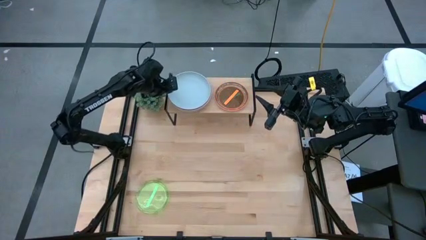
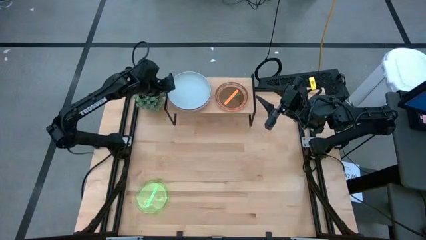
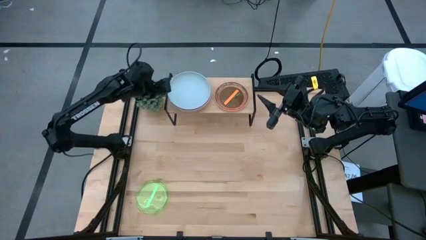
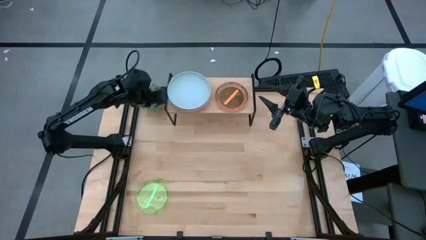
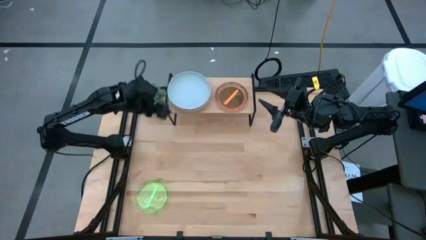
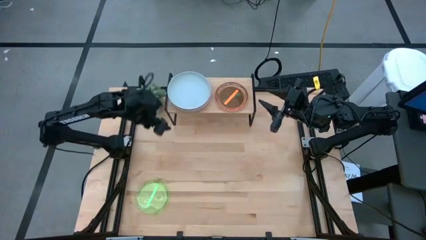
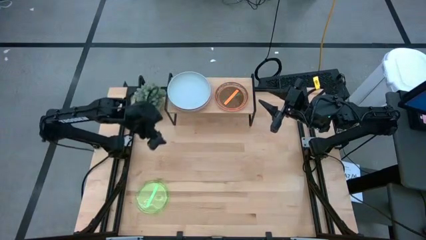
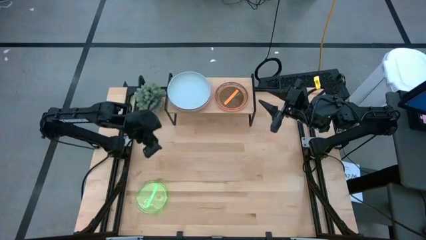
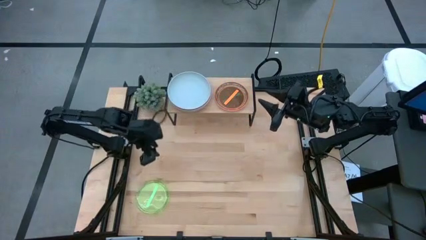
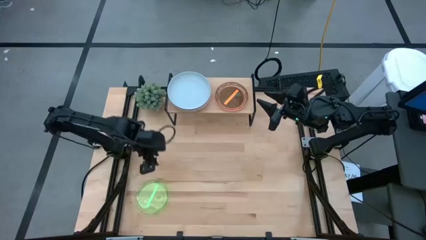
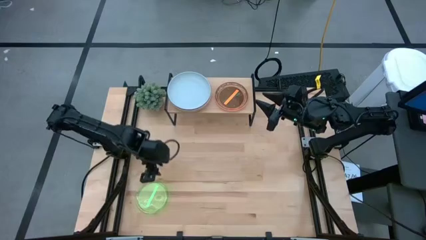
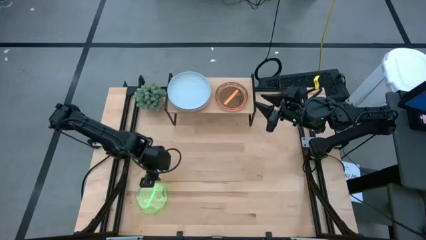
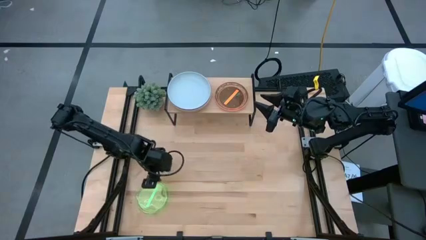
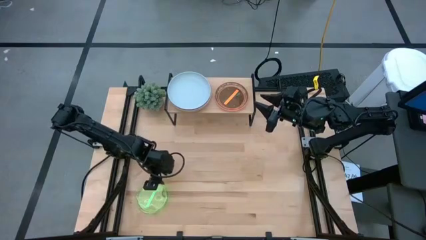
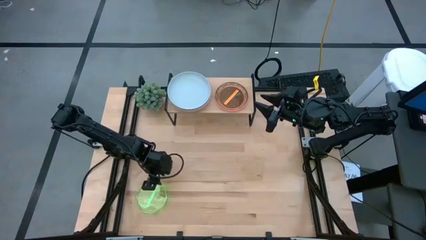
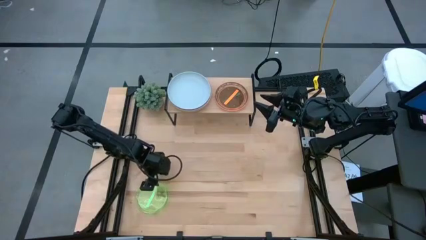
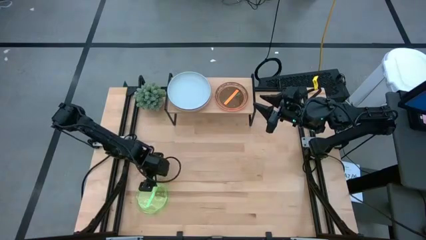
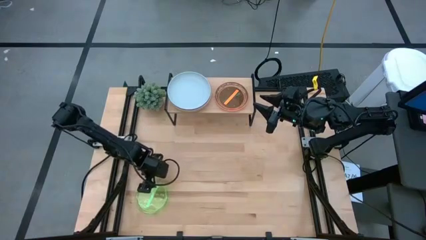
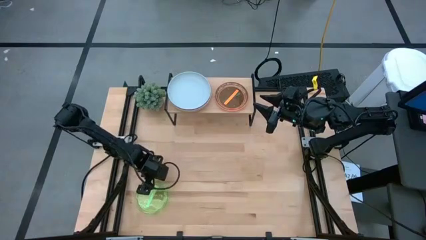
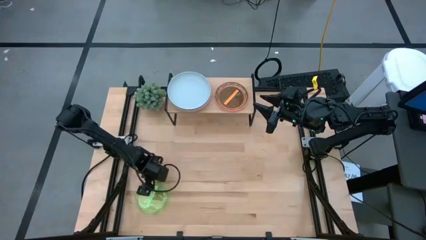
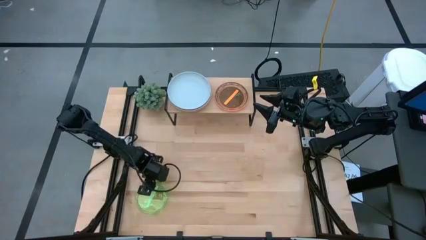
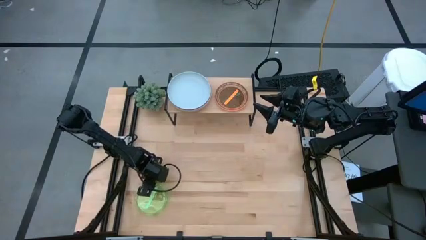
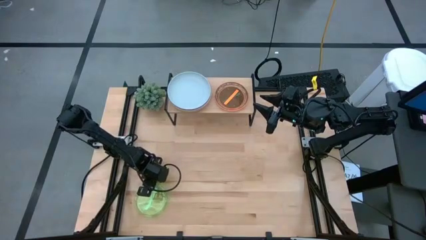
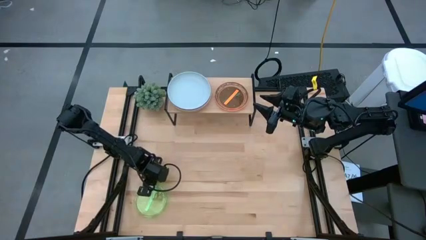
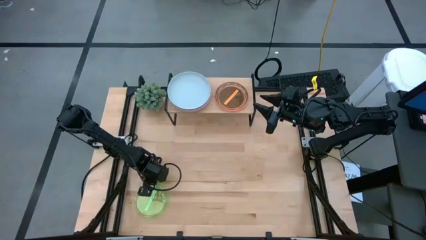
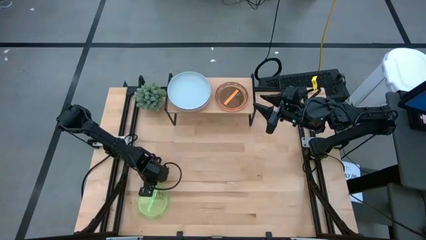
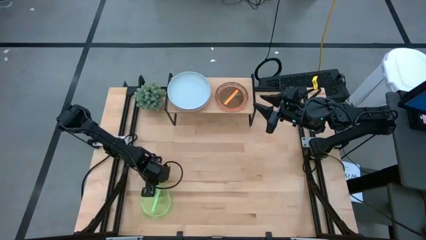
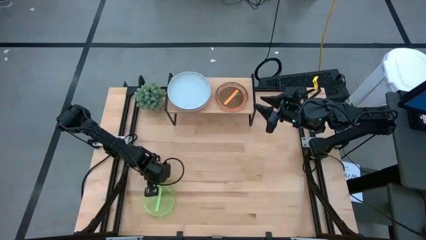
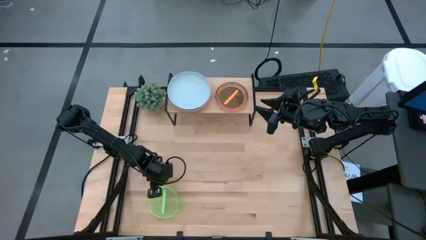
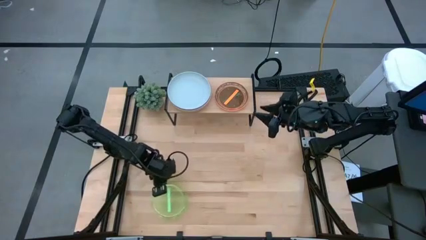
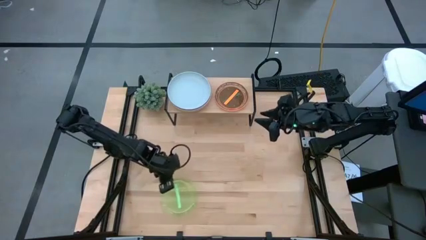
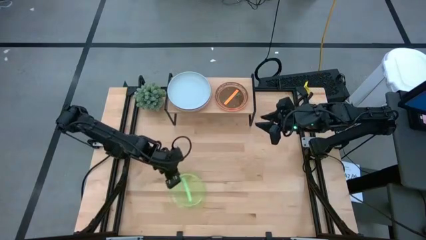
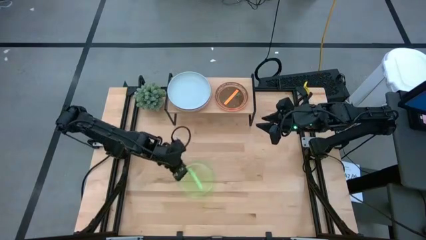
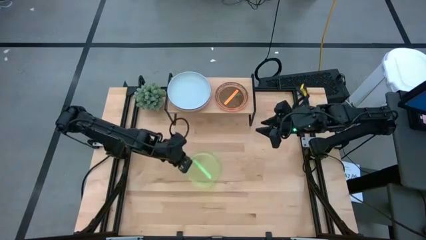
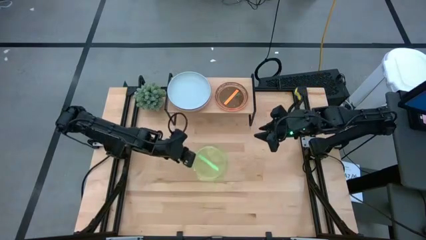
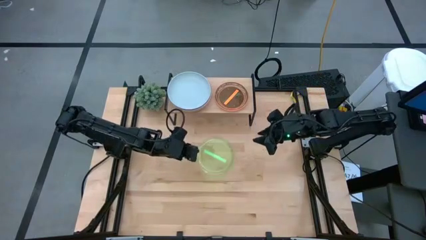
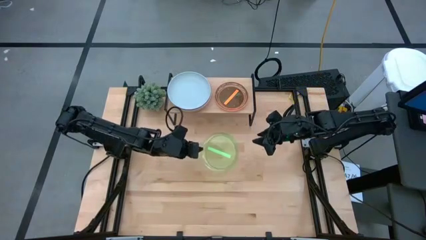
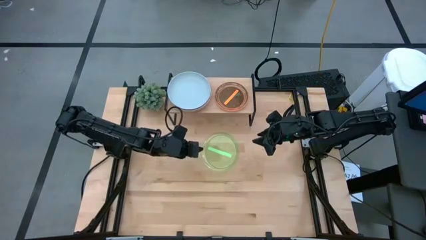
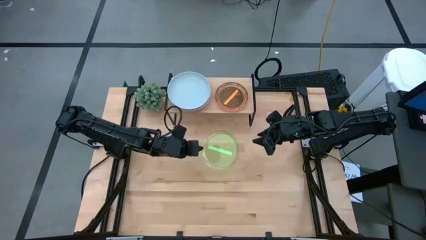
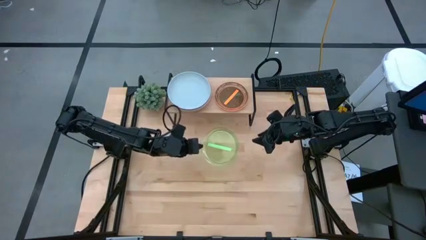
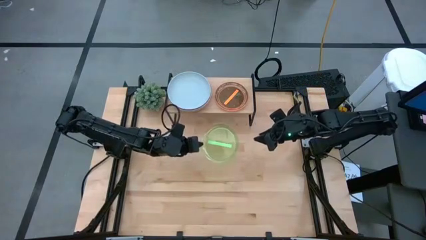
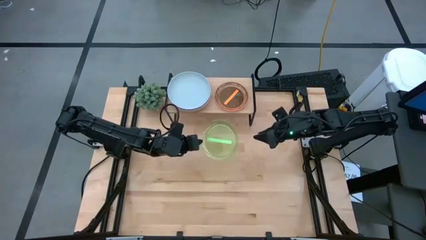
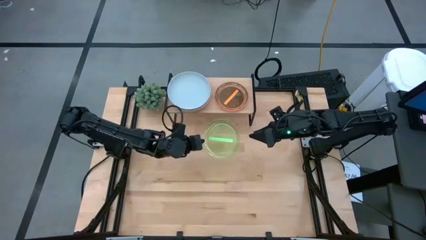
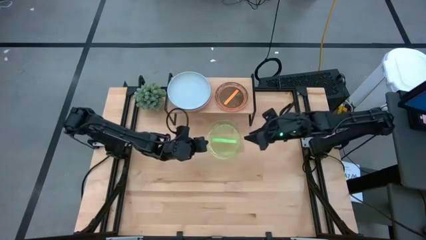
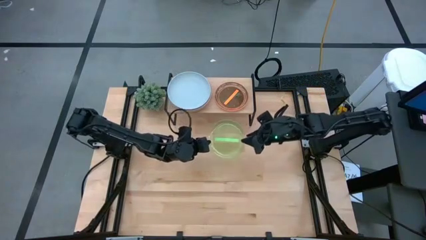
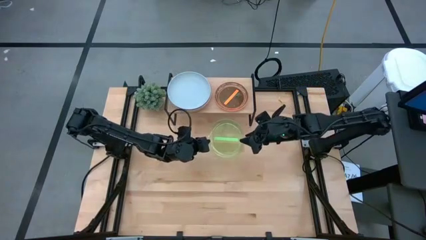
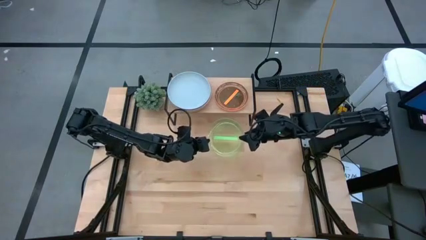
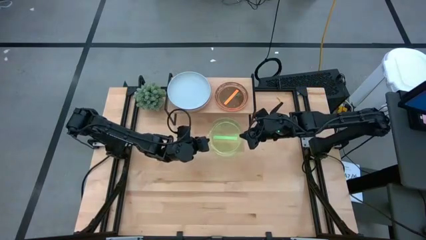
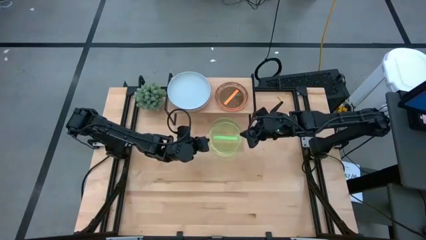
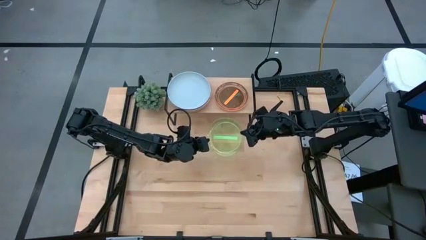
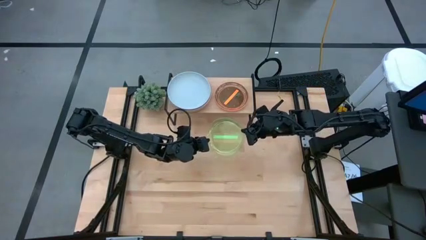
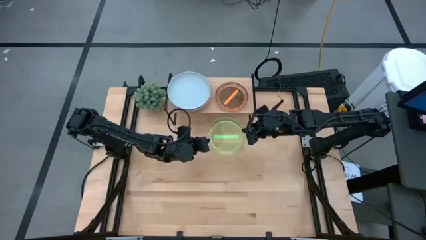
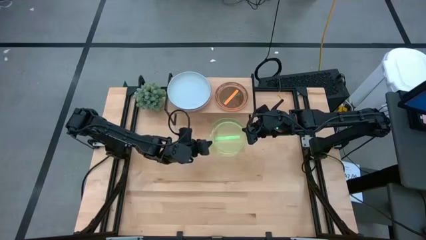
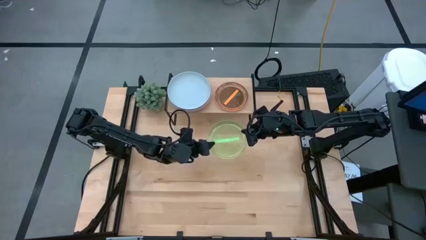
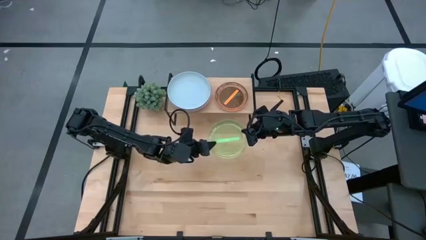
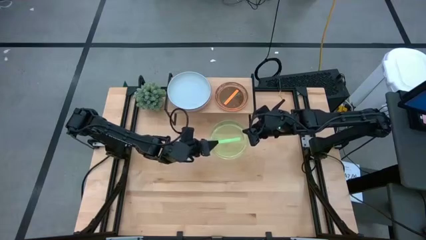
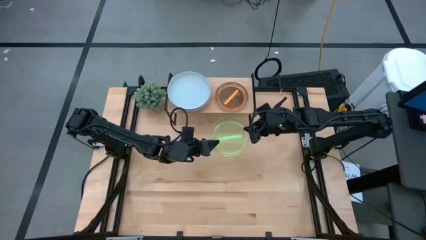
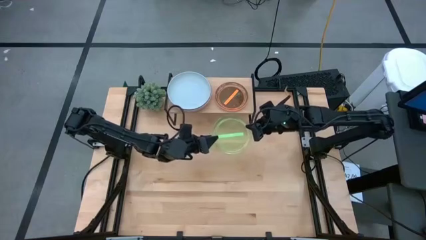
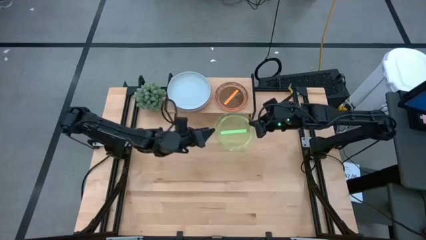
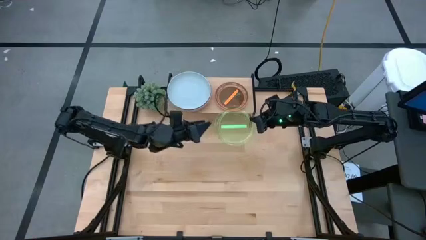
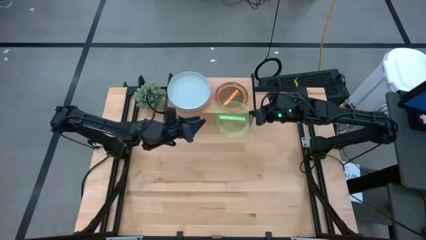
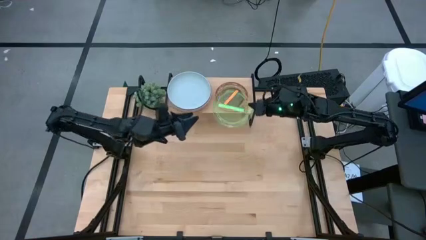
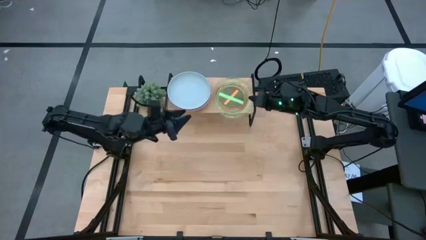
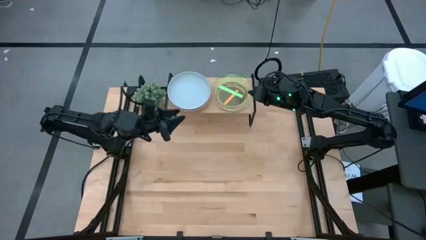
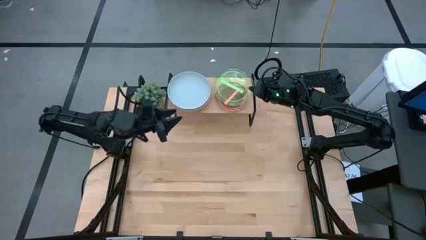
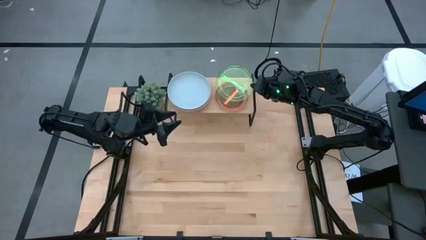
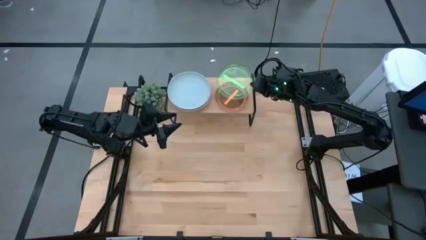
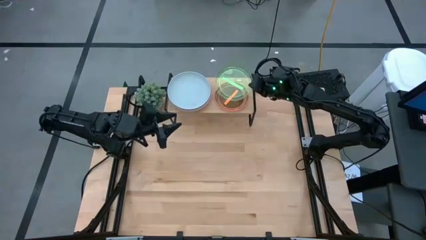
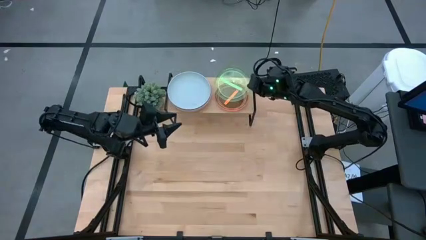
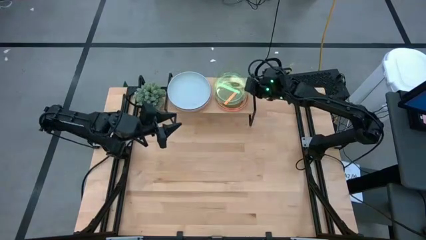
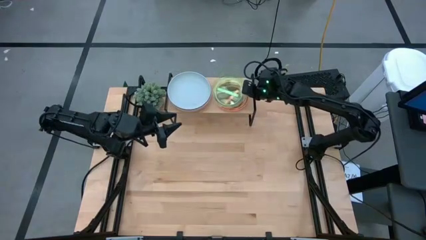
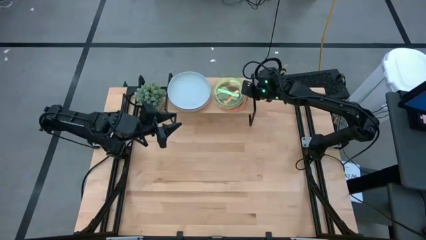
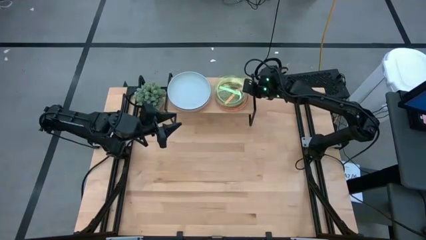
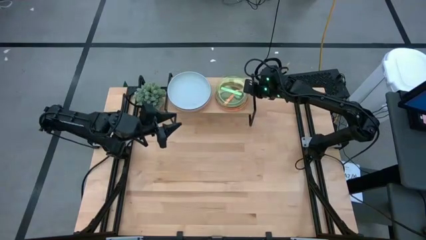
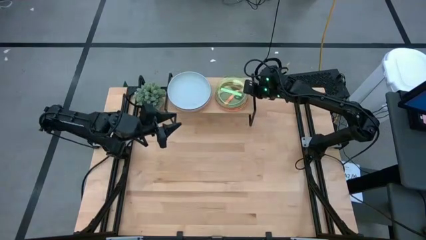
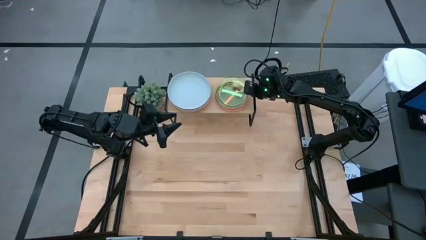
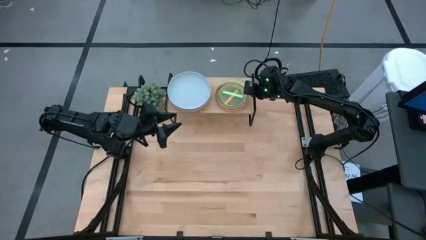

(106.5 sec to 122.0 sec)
Task: Place and stack plates onto a shelf
Stack the small green plate on top of the small orange plate on the shelf

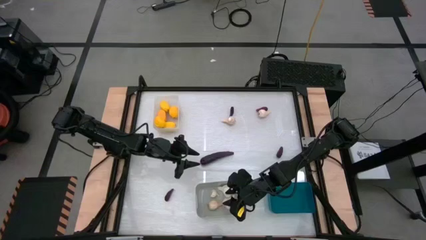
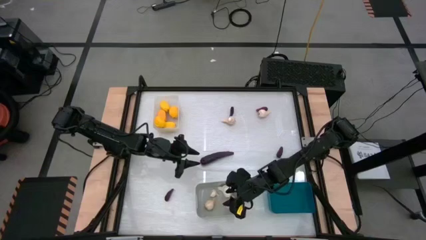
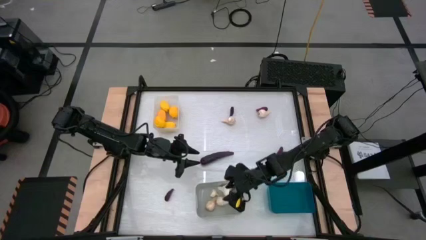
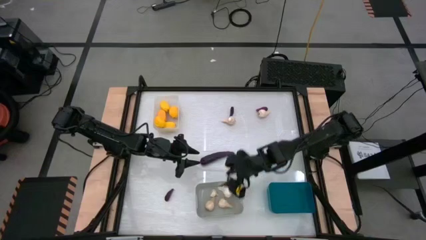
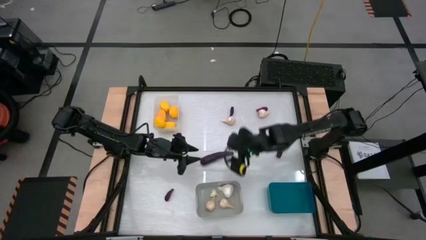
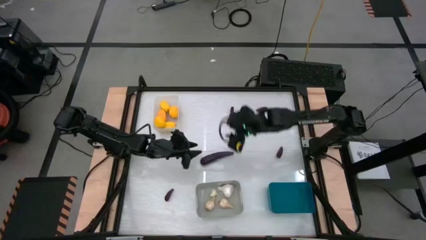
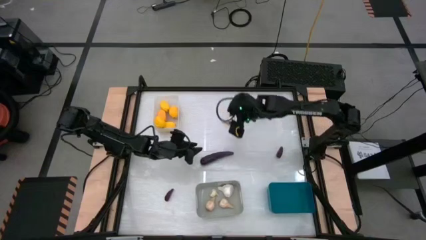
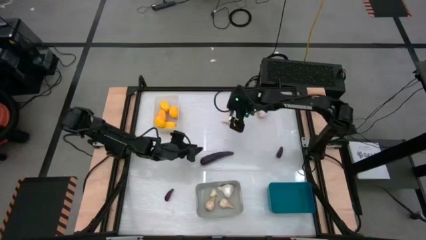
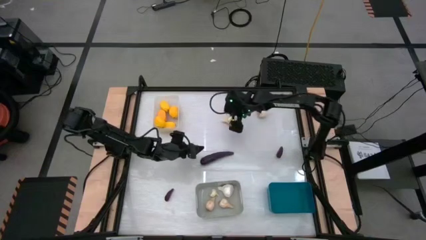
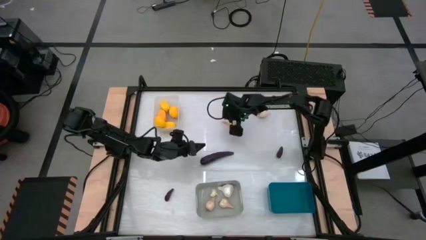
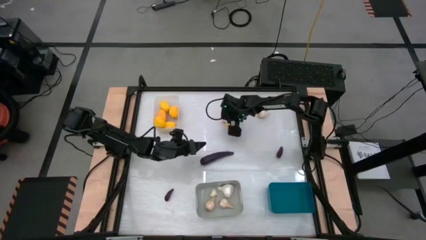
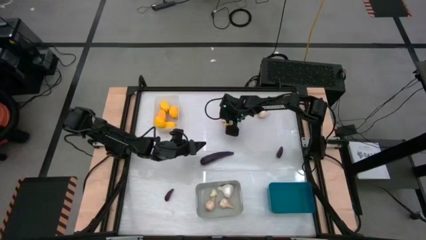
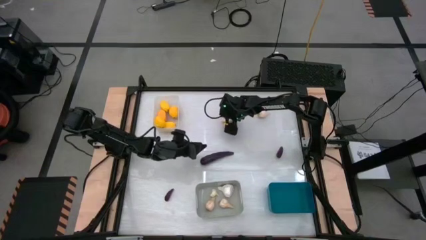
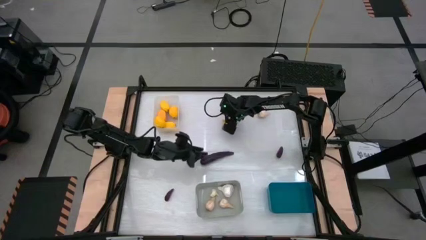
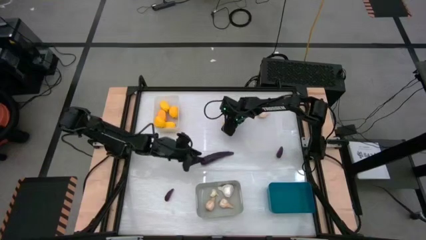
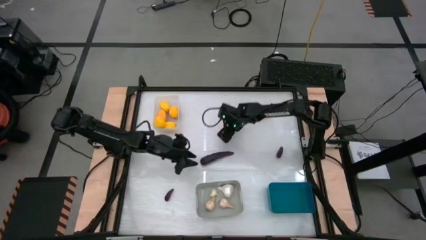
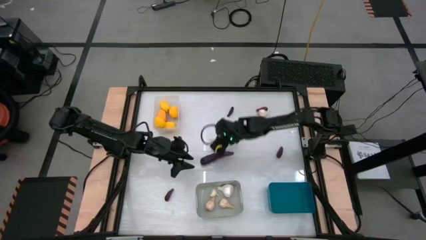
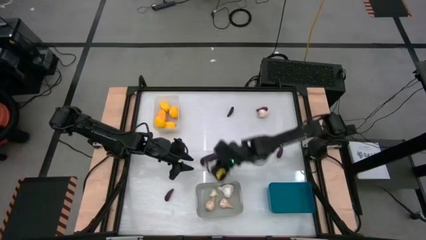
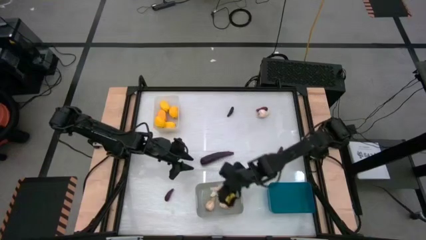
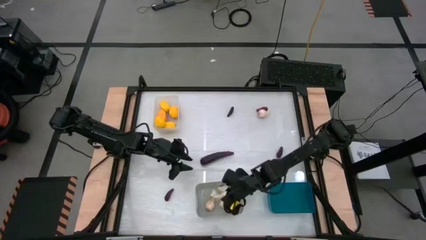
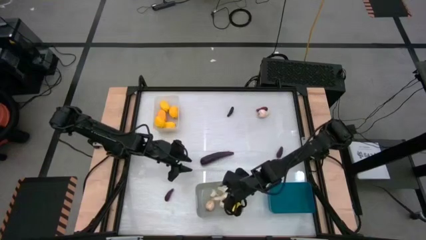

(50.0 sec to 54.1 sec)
Task: Sort produce into baskets
Put the garlic into the gray bin
